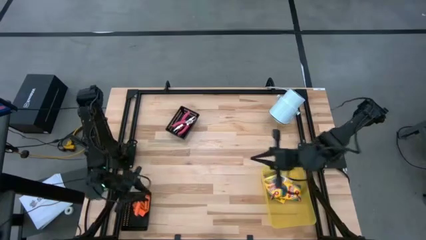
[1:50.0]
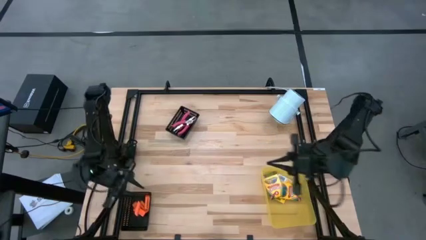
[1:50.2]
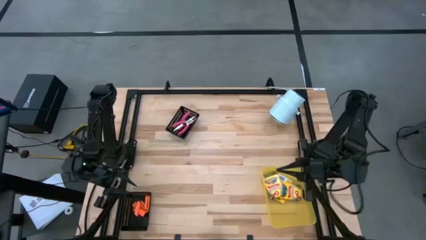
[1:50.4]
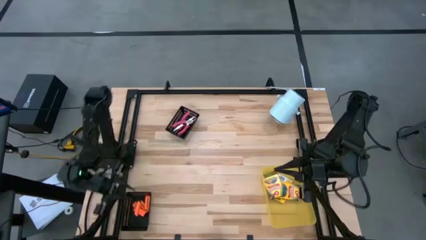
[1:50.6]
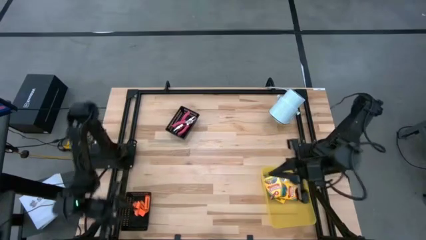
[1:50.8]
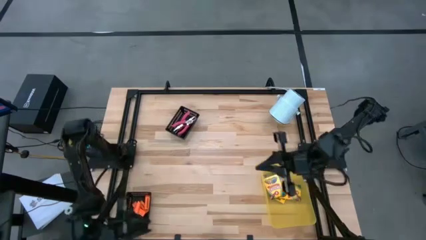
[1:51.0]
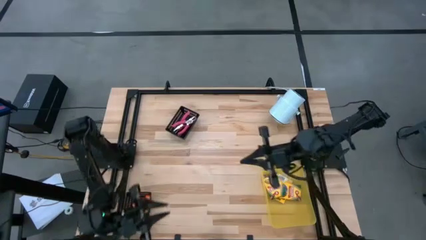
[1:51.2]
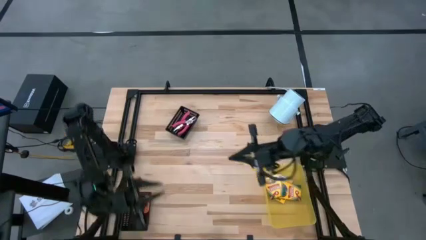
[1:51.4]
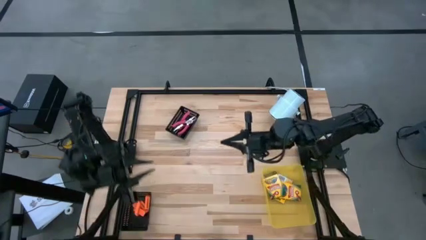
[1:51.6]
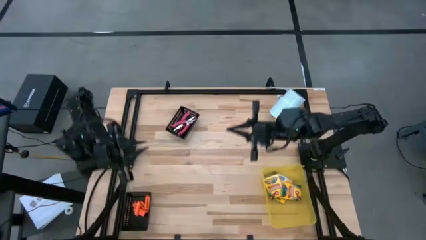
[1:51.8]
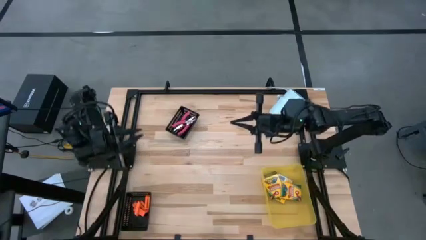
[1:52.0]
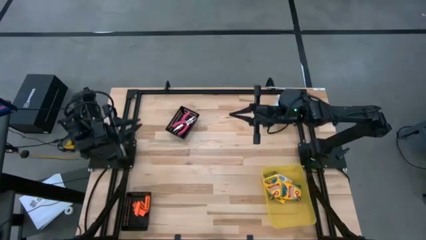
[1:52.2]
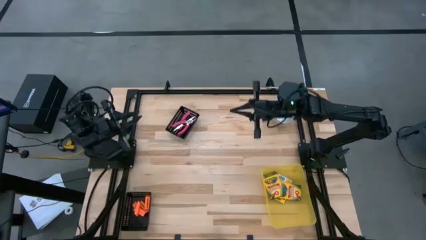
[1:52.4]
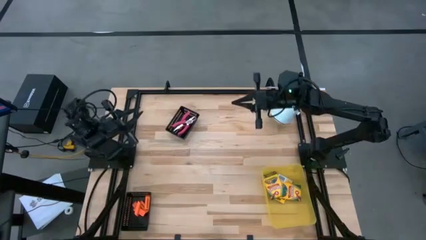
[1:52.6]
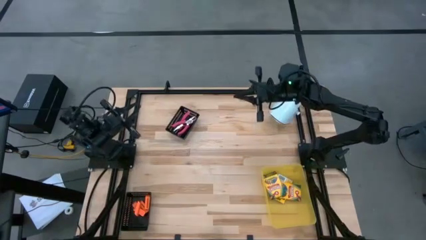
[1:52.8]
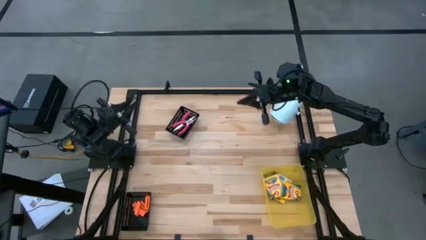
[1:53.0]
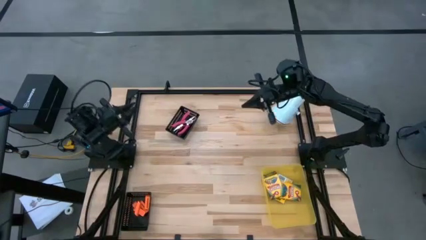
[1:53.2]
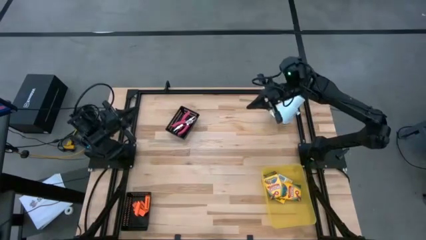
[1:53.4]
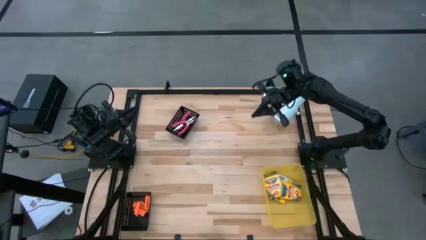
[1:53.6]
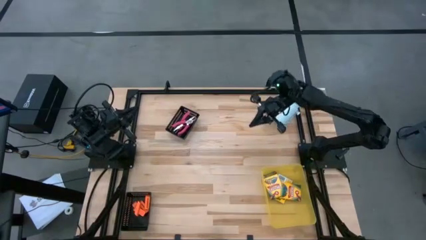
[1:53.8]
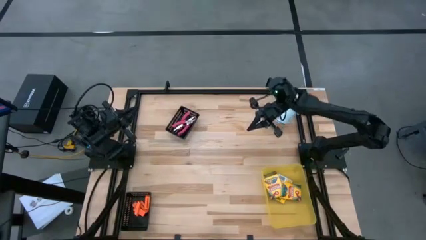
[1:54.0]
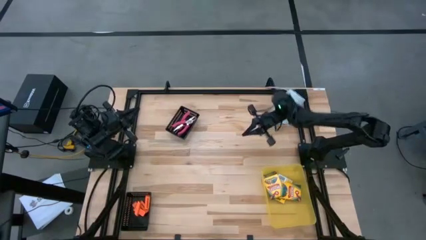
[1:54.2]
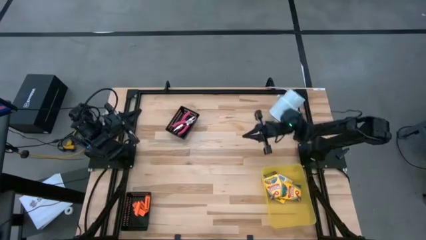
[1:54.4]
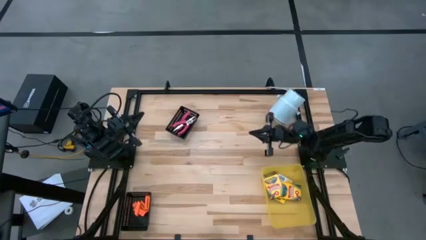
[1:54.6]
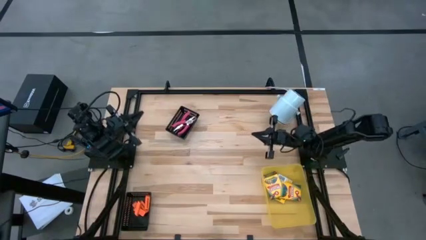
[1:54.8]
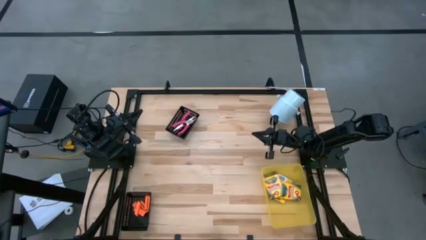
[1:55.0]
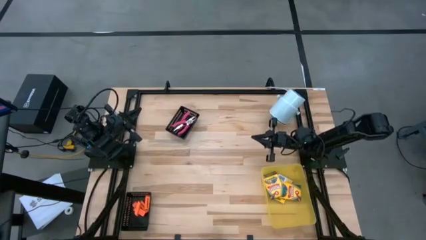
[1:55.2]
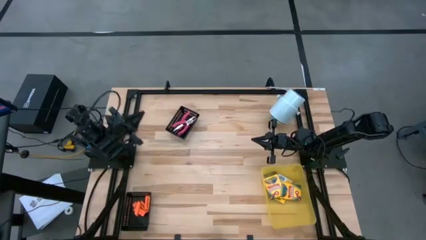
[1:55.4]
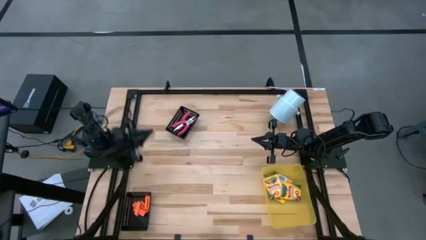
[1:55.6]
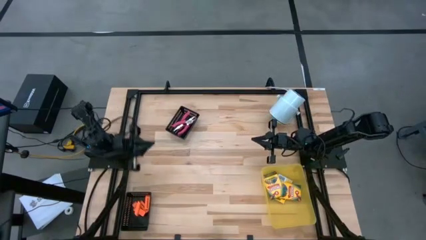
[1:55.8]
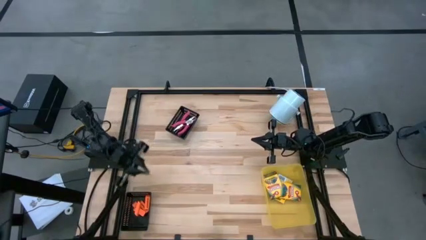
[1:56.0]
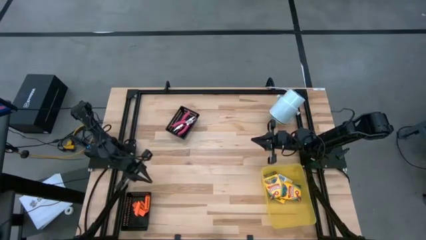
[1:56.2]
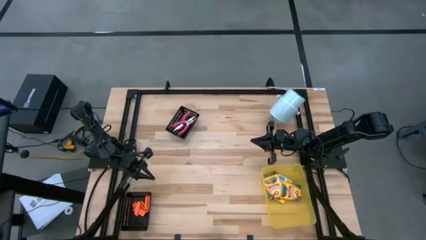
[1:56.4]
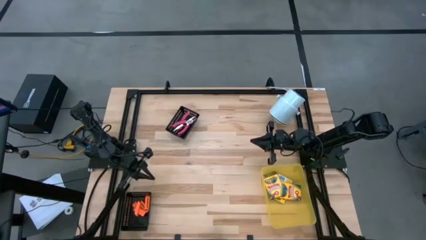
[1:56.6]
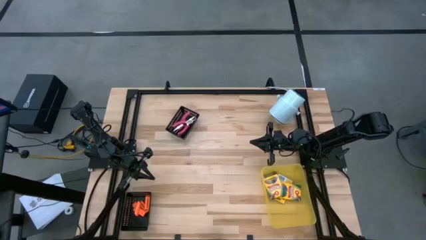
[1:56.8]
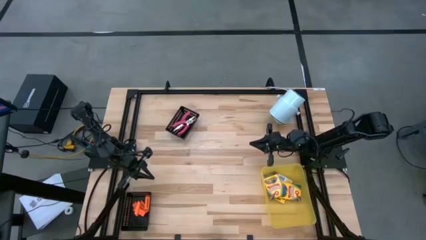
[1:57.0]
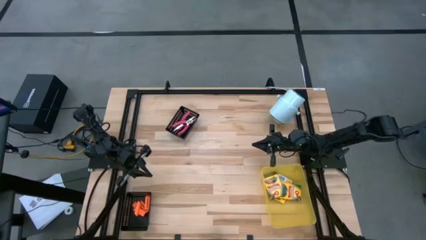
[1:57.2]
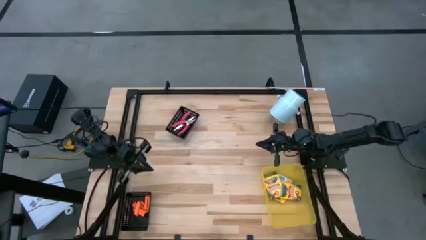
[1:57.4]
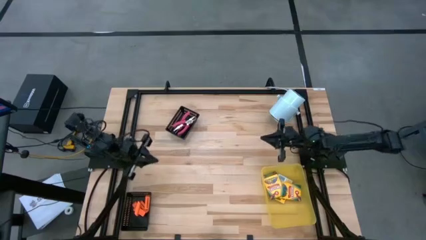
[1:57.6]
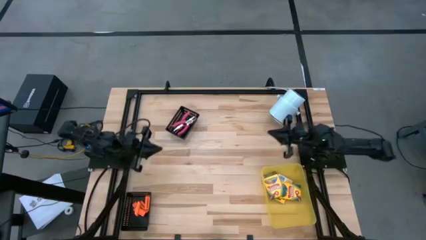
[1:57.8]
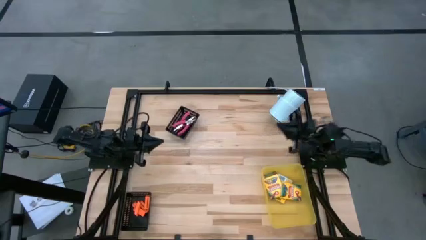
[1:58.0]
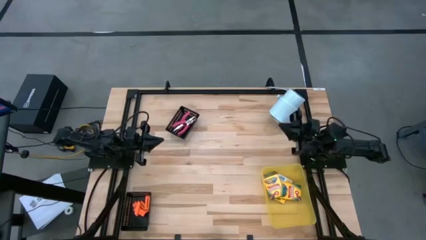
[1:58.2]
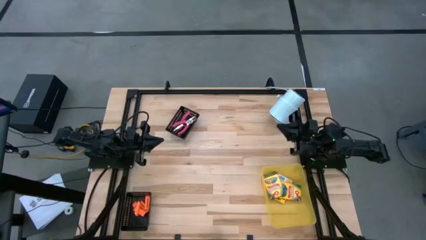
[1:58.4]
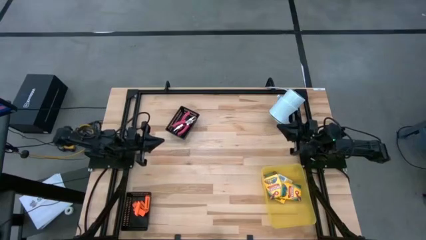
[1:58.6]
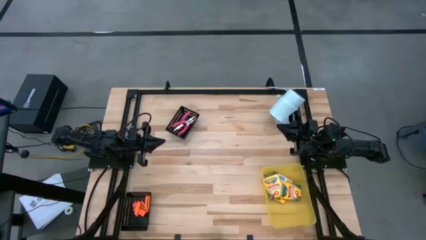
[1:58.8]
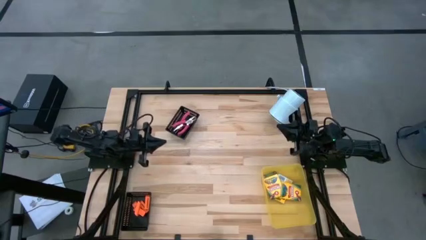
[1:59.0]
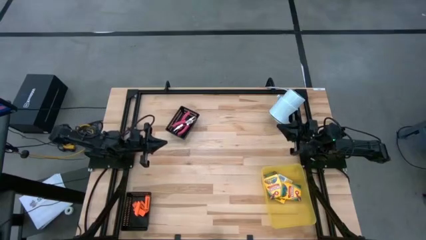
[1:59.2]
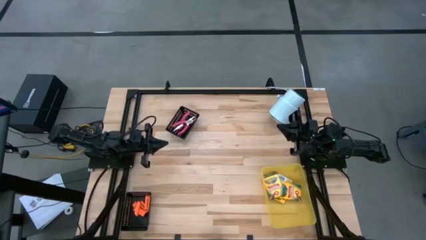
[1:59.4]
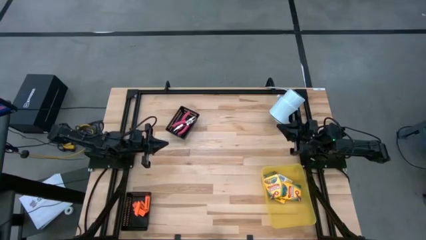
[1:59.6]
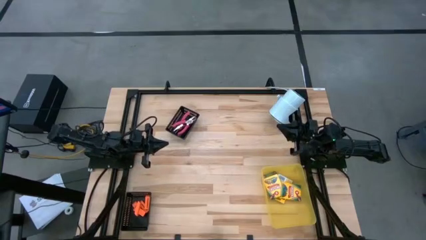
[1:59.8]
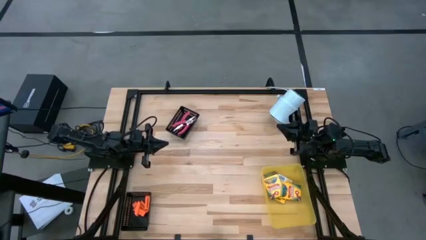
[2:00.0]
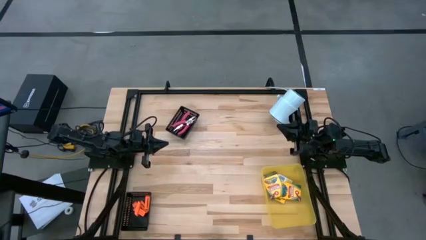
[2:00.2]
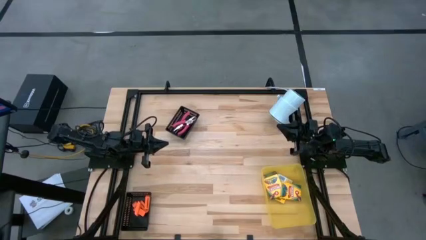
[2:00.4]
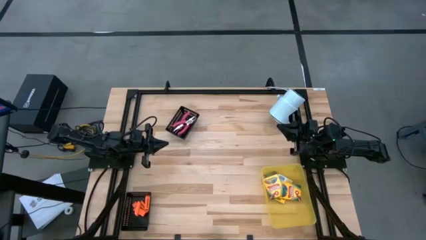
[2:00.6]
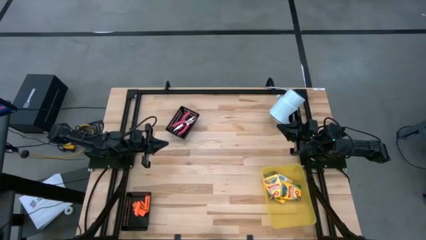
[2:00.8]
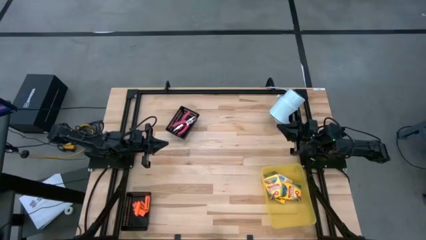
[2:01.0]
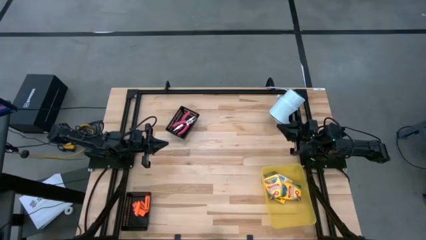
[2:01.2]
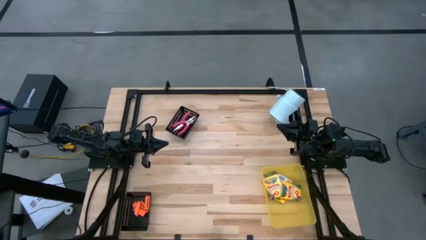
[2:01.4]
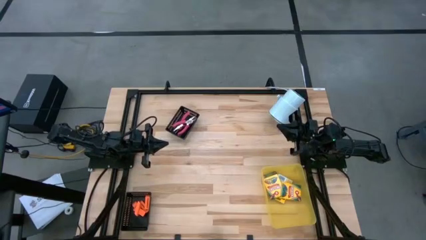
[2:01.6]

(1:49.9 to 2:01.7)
Task: Pick & Place School Supplies
Return to Home Position

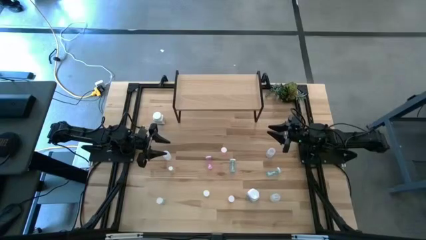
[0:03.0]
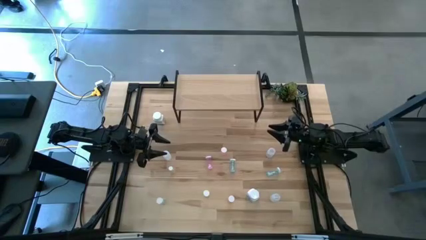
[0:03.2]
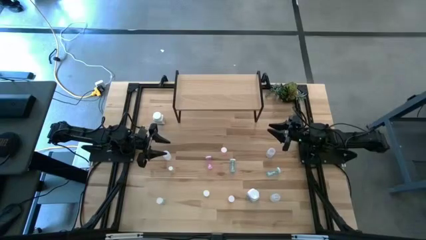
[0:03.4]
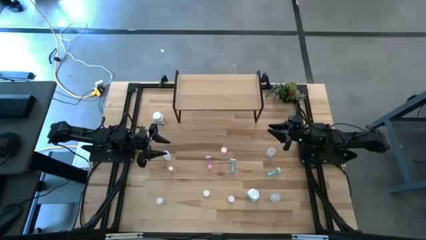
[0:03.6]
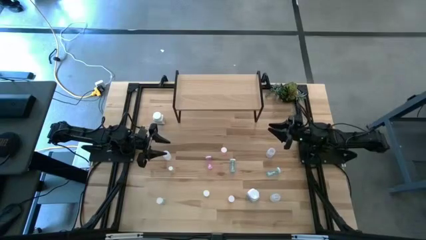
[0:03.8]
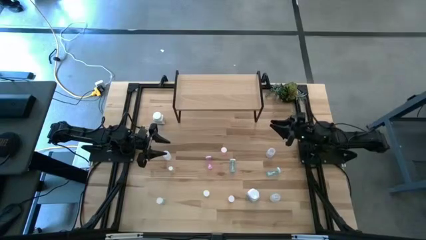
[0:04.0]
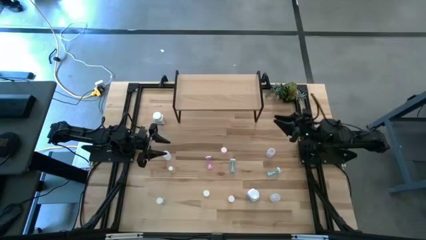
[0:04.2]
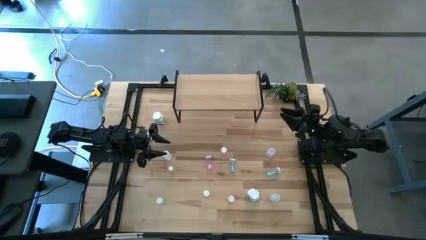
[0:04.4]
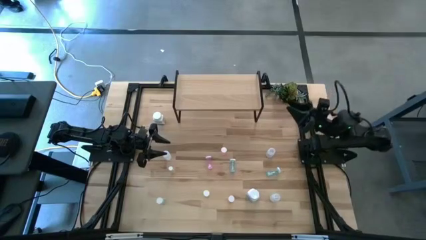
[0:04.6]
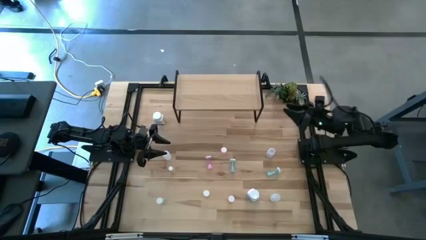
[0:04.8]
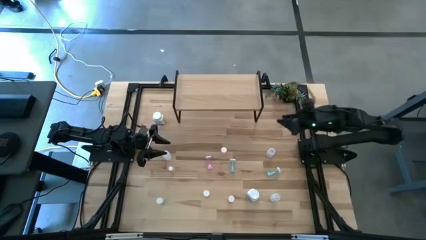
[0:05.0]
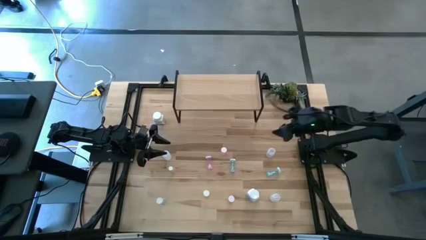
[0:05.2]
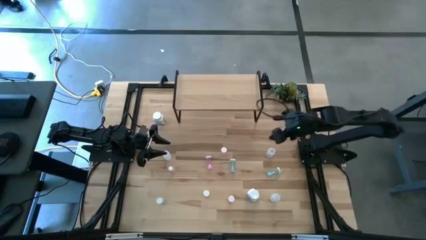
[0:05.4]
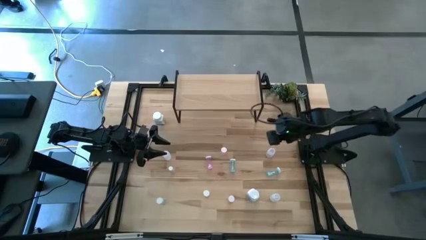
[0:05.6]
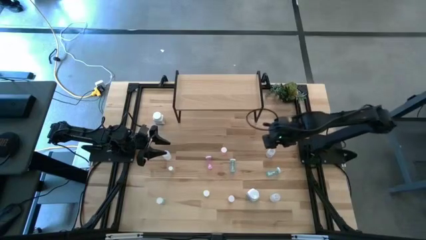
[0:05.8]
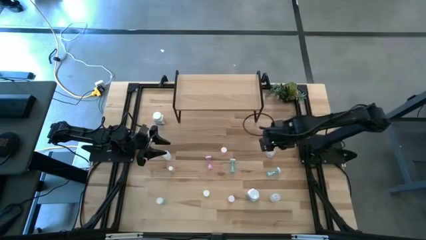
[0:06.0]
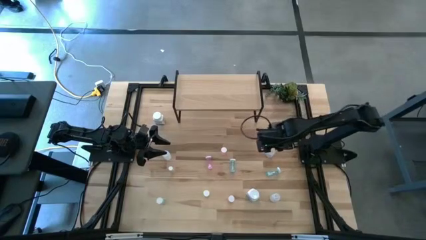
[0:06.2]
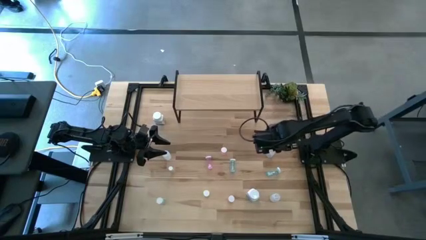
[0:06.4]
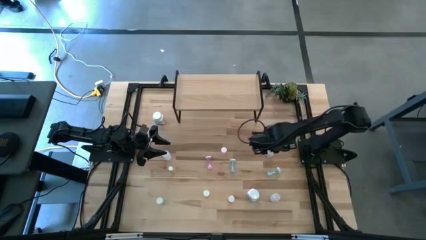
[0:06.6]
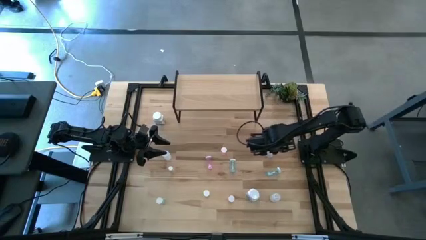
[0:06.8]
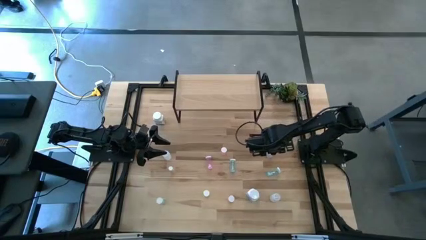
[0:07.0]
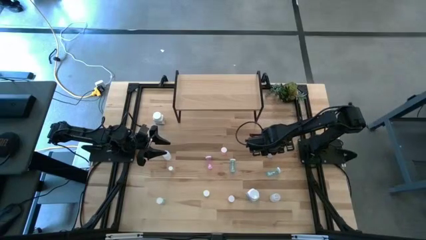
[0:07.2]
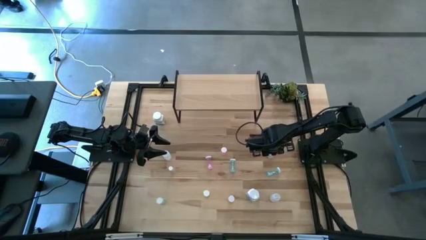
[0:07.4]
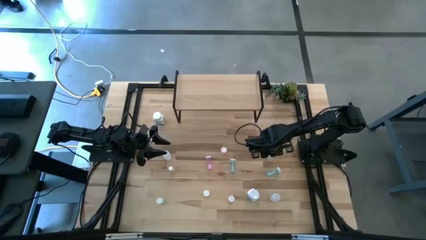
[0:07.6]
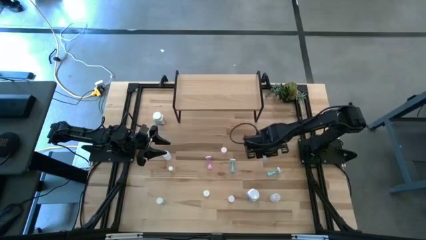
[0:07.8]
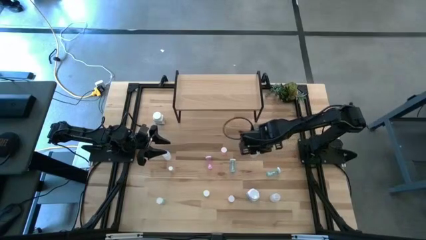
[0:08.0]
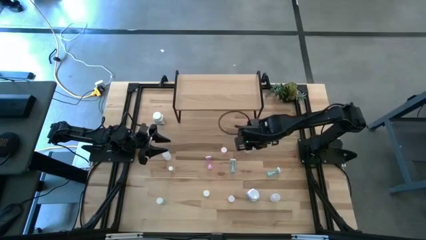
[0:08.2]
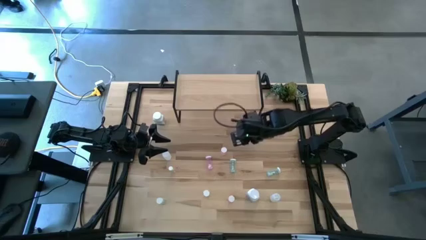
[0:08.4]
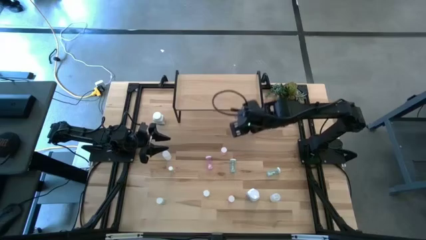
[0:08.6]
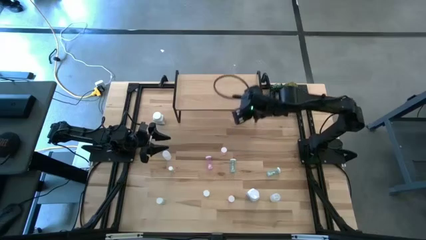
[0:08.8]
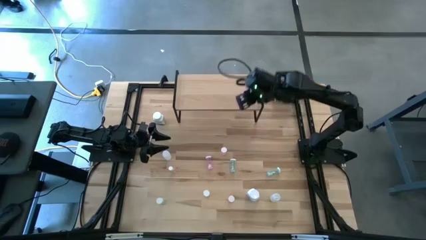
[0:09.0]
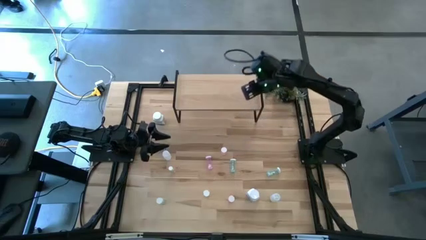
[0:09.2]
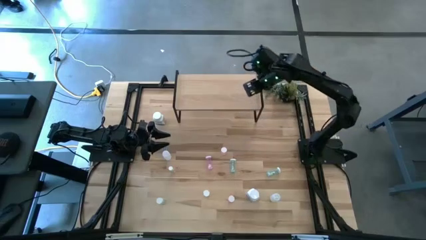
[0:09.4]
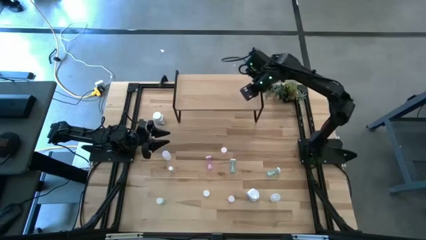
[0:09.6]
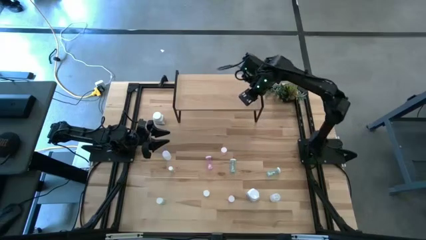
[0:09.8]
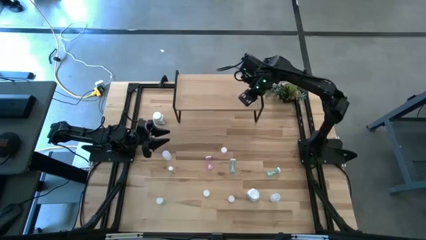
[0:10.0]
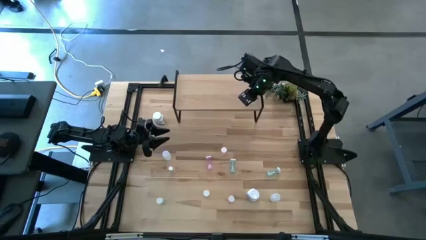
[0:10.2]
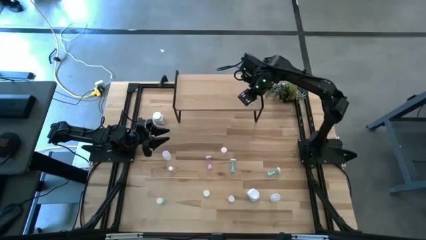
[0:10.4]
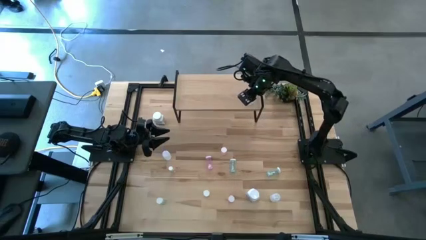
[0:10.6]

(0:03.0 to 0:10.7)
Task: Pick and place medicine bottles onto shelf by color
Put the right transparent medicine bottle on the shelf
